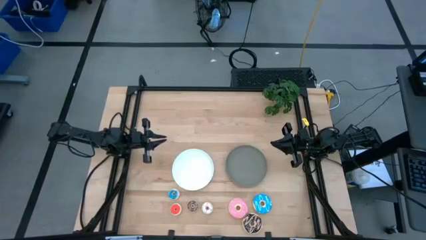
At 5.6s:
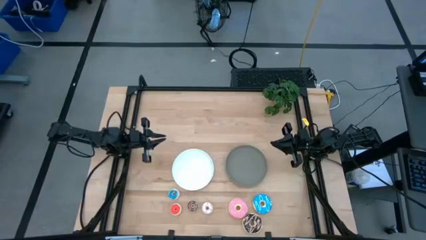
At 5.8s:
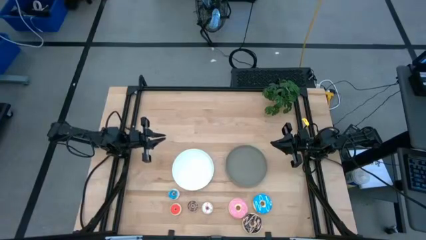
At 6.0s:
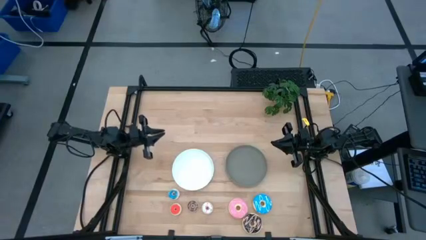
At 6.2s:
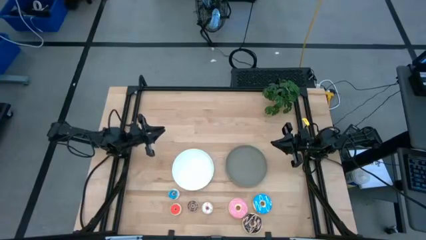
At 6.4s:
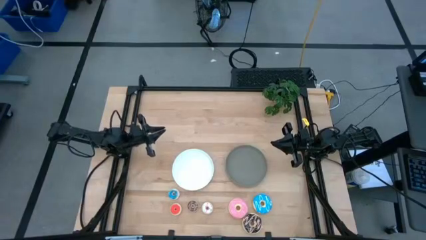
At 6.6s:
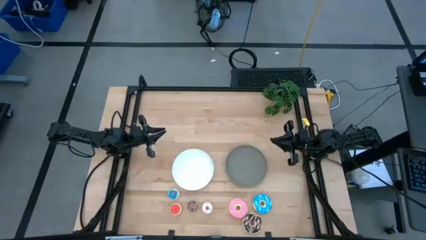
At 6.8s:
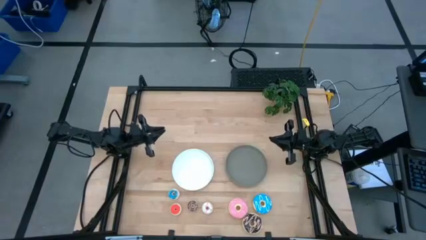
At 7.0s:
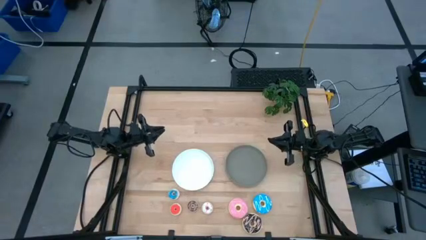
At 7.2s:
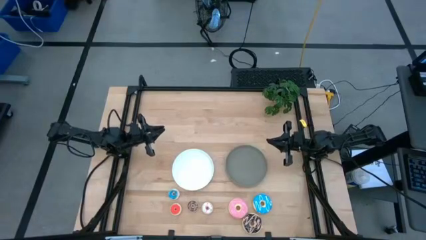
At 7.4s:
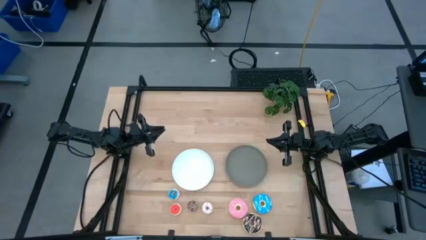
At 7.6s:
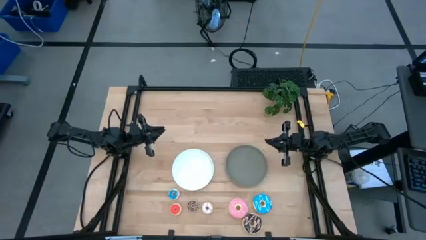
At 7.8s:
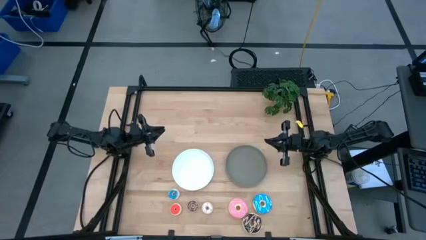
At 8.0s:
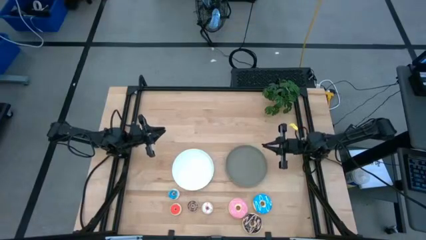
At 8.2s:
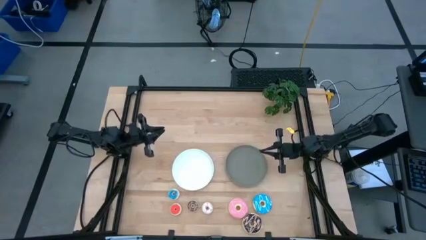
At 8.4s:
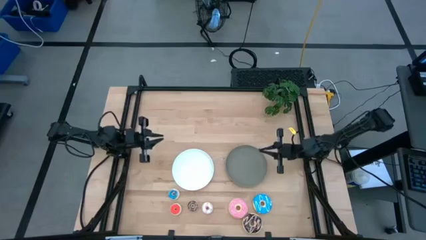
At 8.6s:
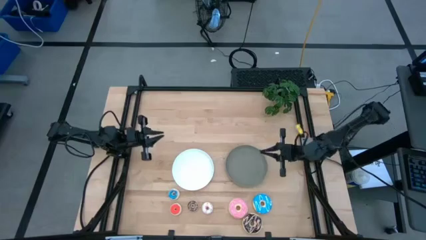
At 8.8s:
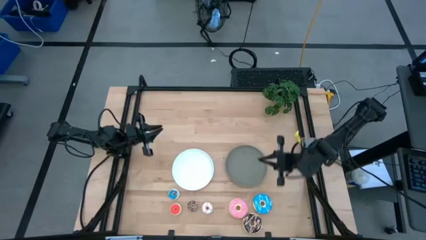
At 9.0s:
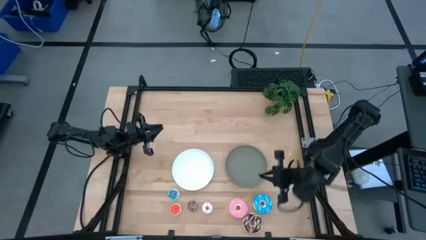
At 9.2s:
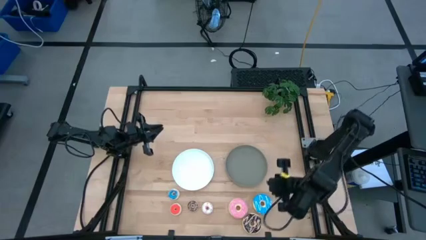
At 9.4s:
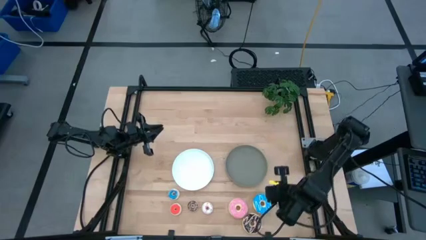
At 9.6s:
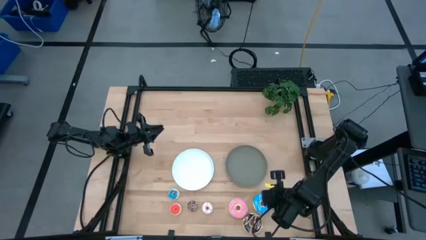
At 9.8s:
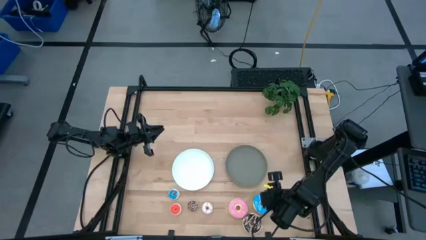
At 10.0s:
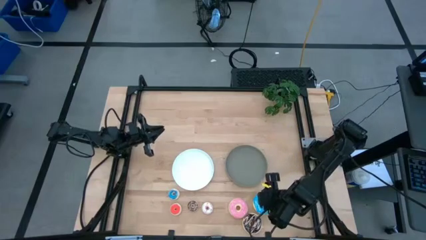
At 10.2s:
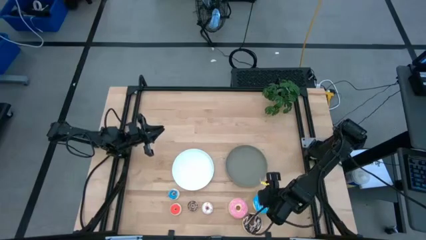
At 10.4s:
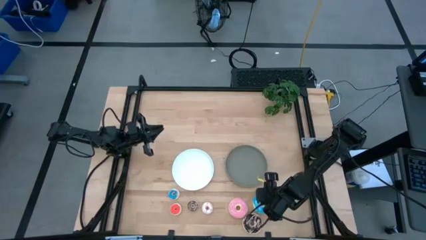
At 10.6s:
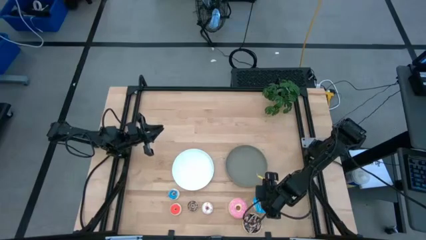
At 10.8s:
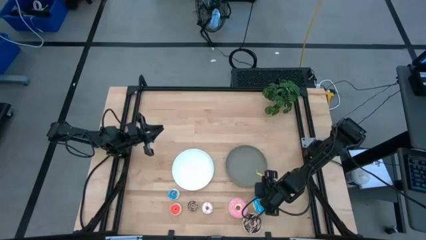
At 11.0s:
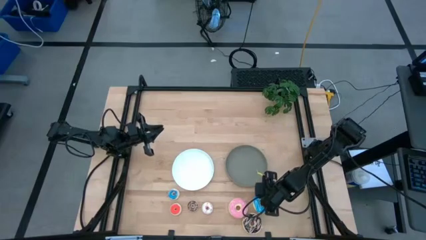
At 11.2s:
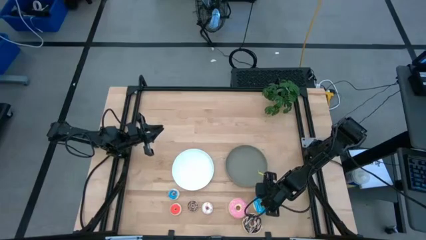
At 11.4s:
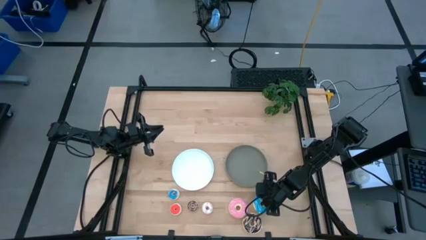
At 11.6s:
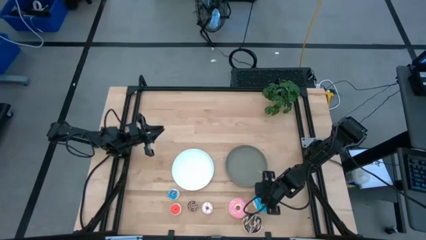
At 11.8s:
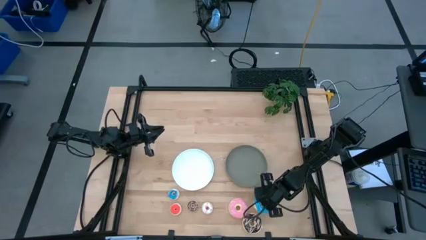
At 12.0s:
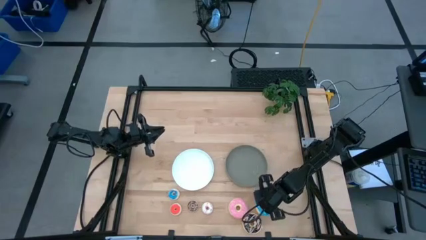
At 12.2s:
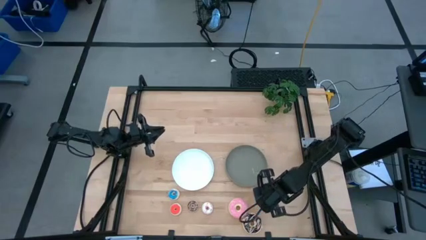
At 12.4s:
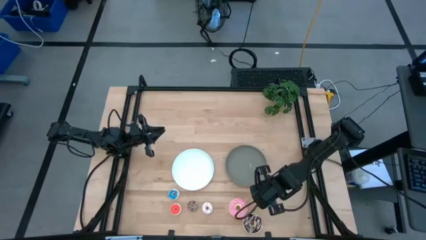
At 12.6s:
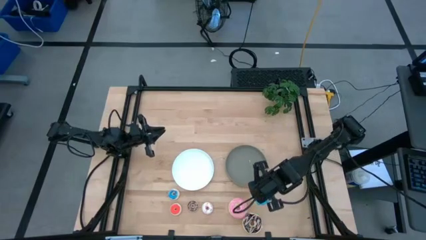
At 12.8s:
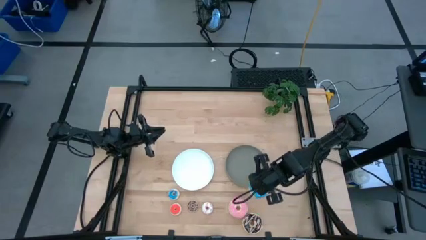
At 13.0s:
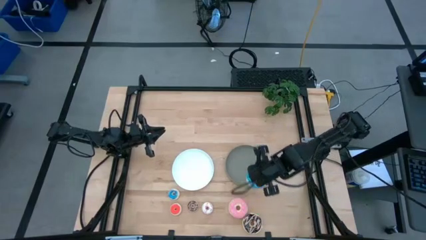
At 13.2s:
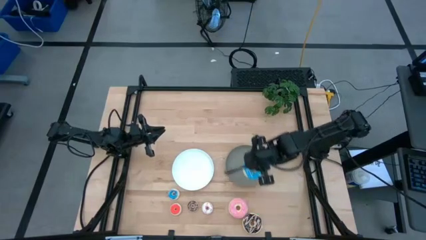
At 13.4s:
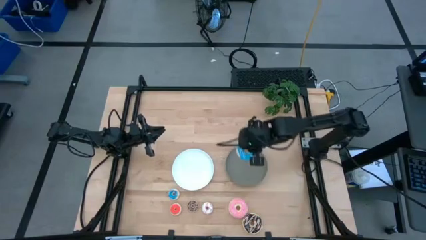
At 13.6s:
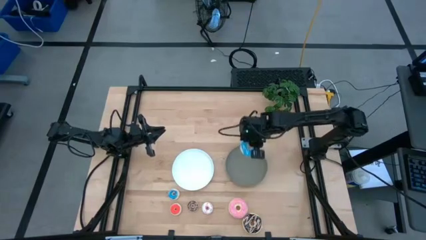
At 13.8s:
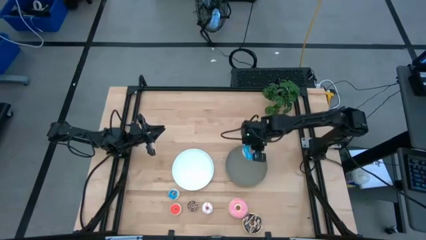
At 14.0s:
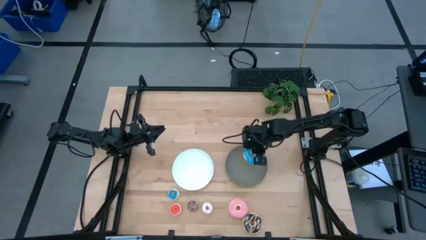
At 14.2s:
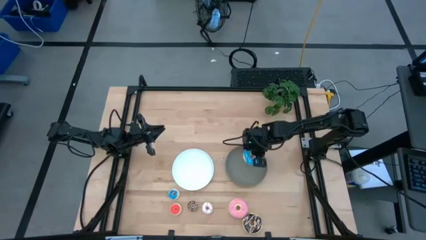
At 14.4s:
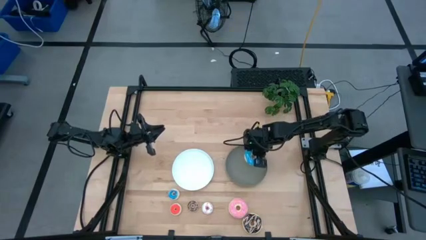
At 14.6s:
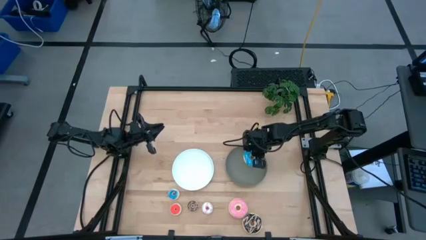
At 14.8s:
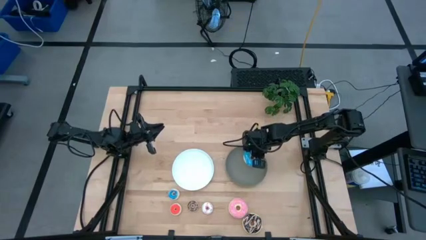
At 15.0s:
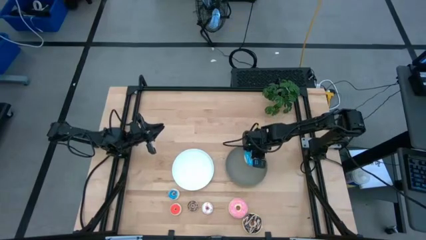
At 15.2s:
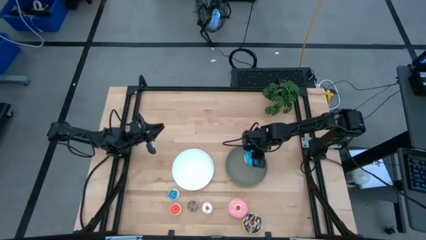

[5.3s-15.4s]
Task: Pick & Place donuts
Put the big blue donut on the gray plate

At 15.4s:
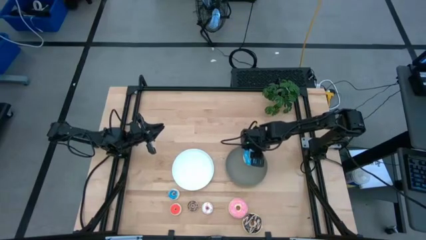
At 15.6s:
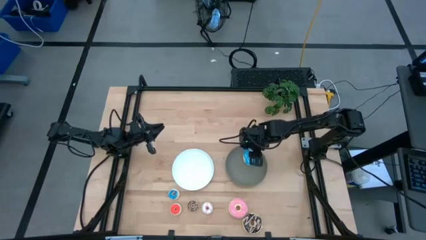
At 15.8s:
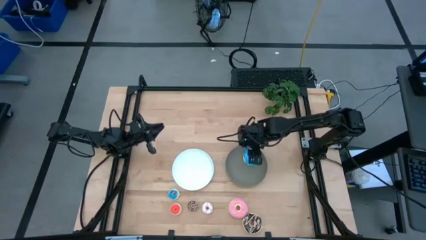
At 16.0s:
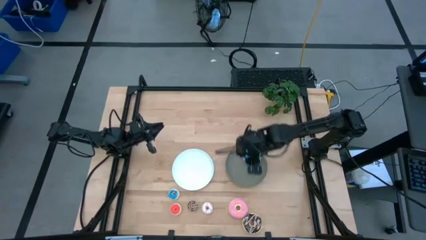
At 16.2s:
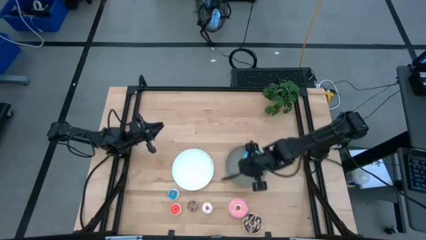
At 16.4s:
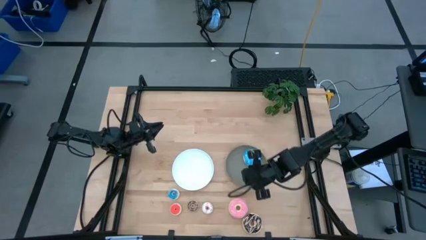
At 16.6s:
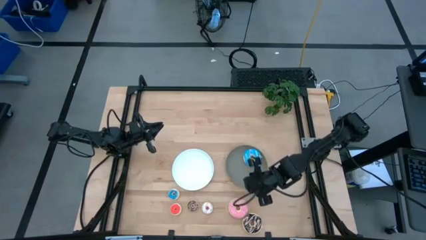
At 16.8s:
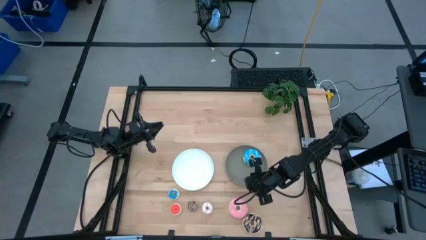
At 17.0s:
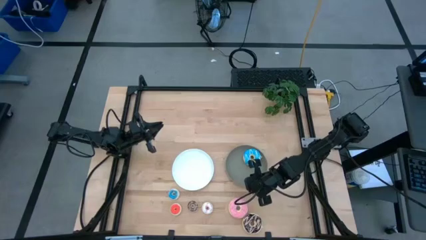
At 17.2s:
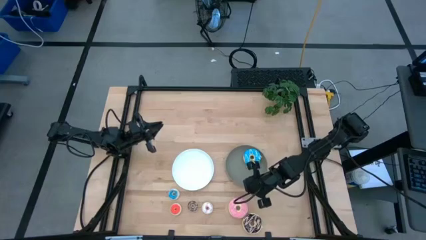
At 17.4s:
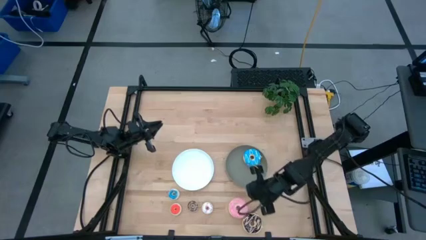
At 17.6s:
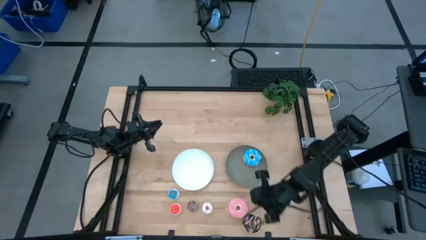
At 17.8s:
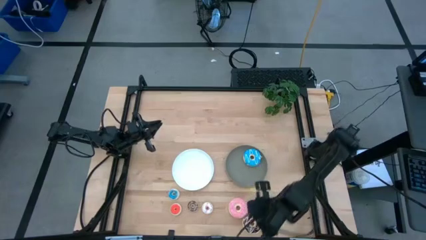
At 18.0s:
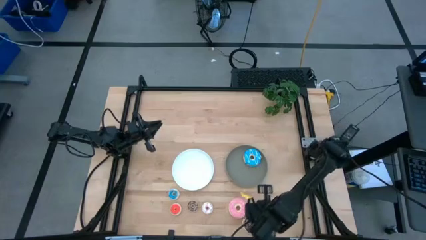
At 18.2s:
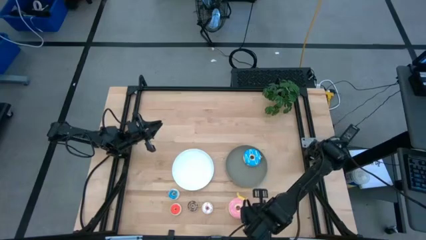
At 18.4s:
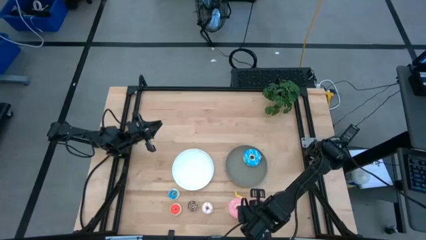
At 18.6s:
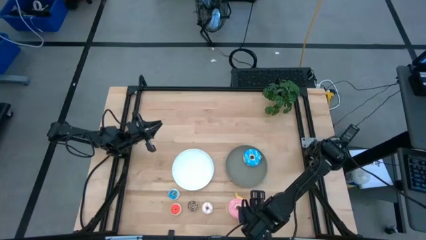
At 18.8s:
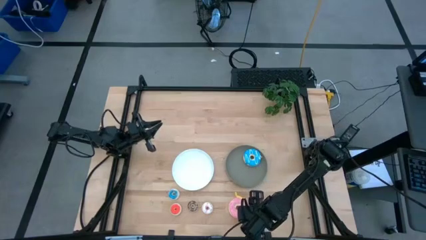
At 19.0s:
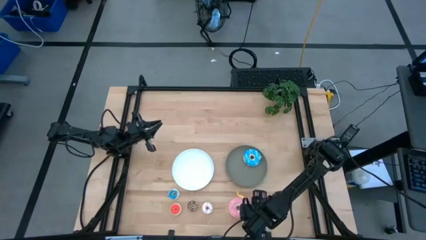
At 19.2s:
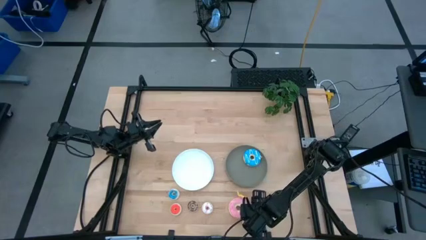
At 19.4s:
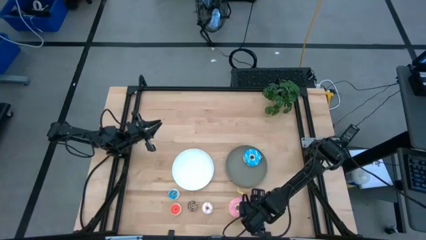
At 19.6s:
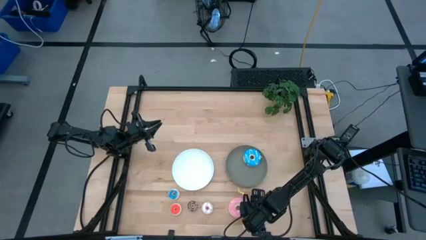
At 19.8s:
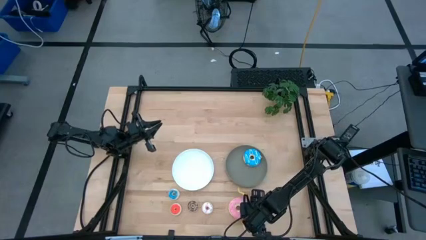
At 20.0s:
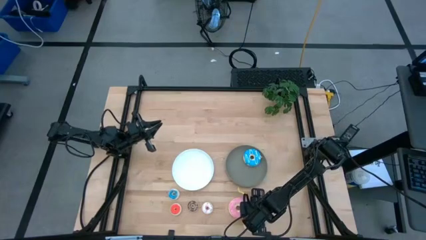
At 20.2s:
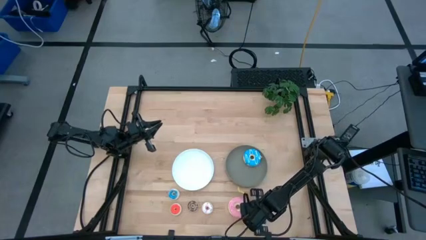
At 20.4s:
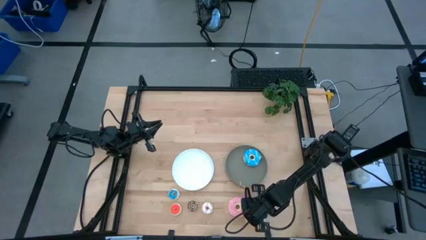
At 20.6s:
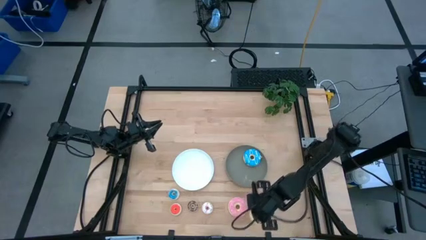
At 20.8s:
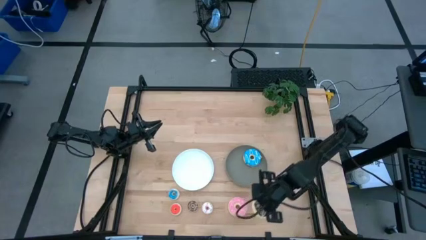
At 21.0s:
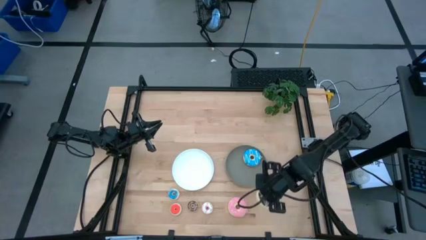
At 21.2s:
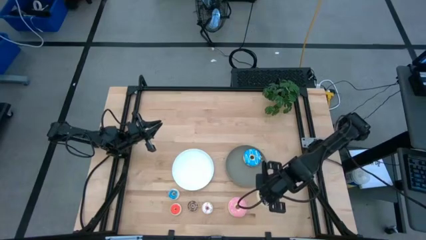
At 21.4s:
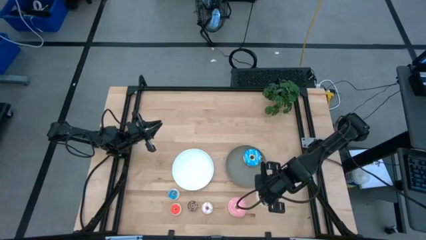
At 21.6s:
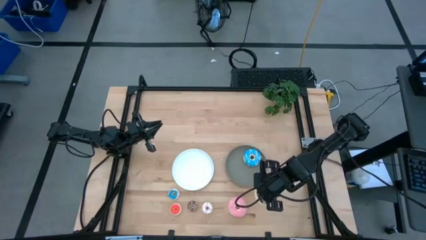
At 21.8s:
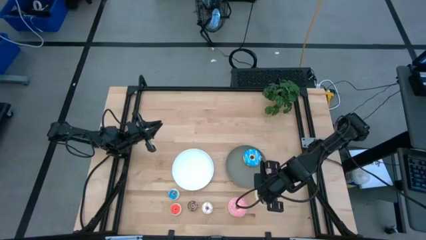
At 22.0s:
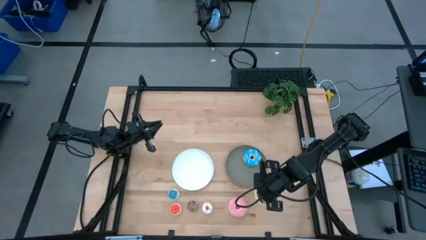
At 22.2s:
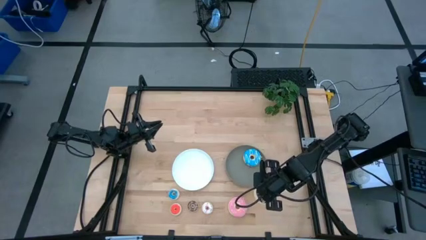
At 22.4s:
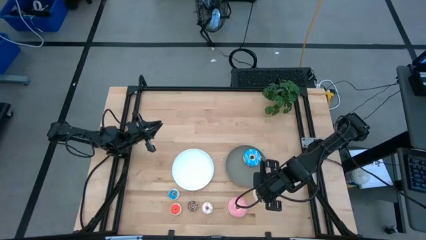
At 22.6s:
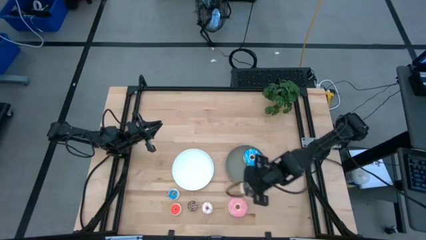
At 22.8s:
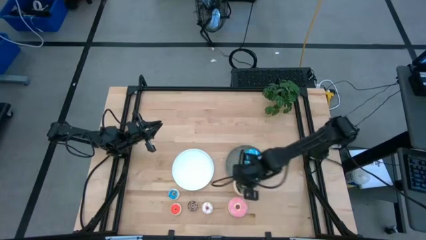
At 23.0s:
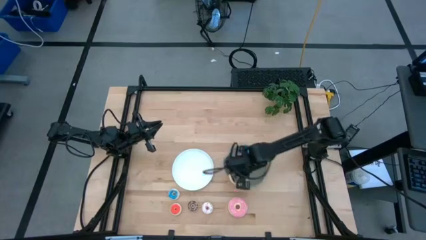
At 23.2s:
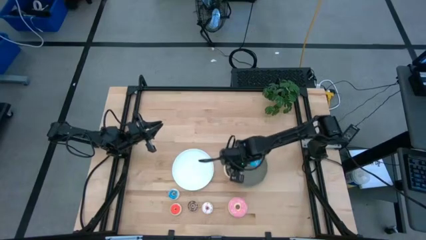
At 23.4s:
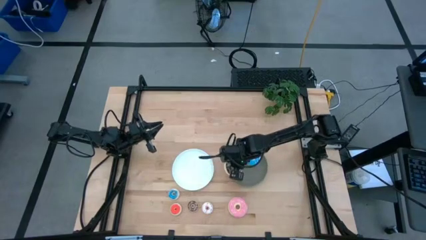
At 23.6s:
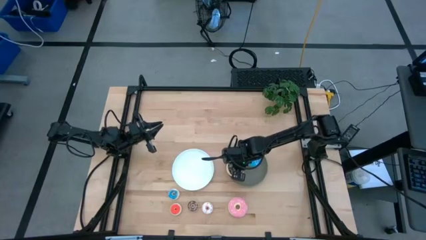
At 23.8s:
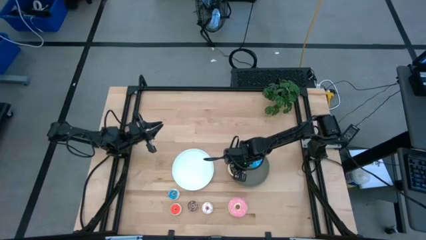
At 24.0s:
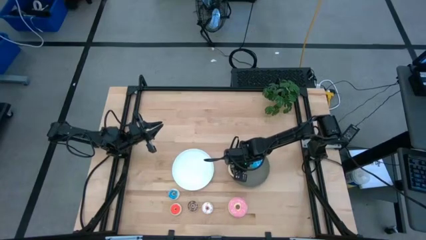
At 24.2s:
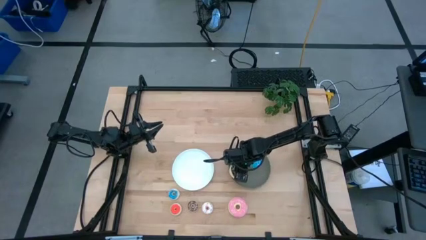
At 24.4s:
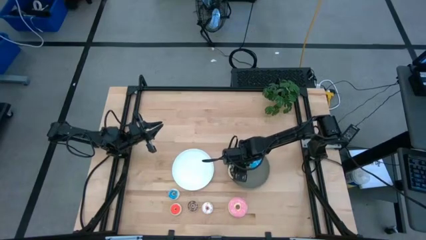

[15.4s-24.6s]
Put the big black donut on the gray plate
